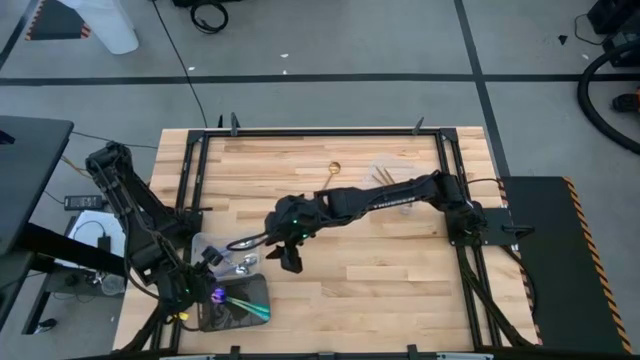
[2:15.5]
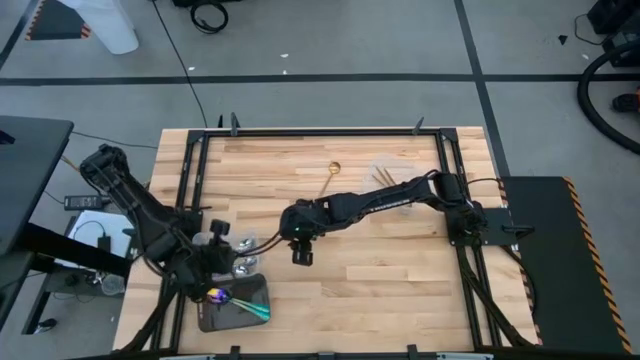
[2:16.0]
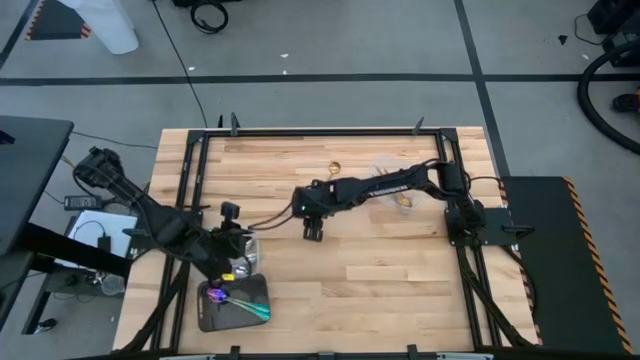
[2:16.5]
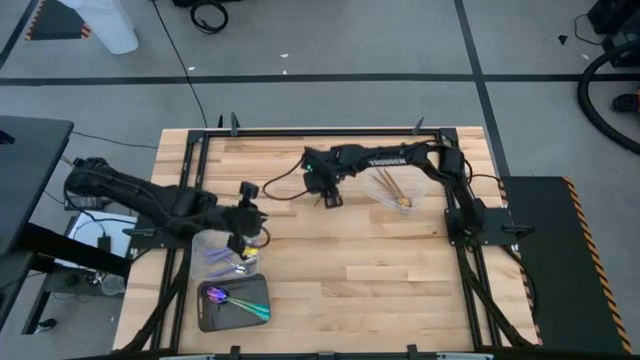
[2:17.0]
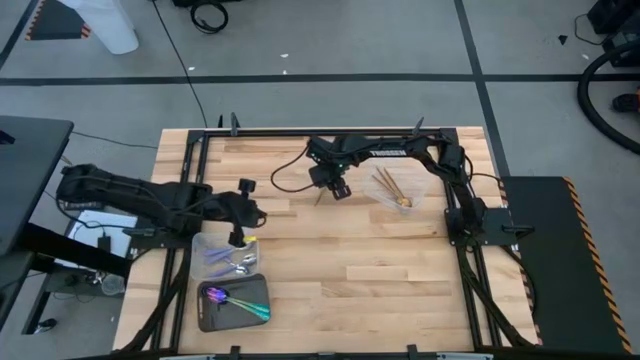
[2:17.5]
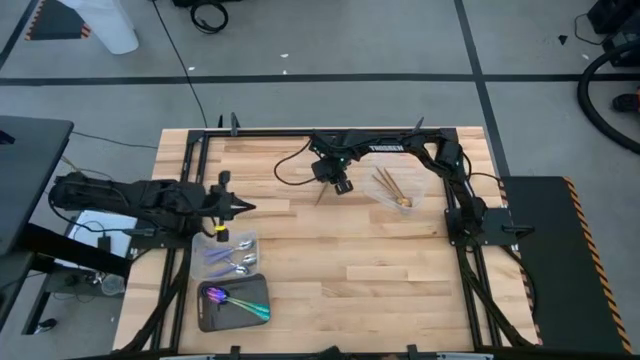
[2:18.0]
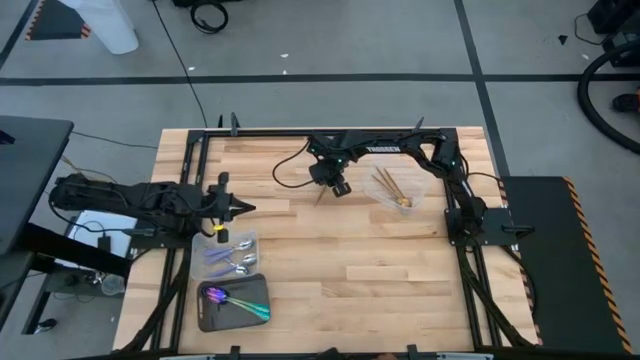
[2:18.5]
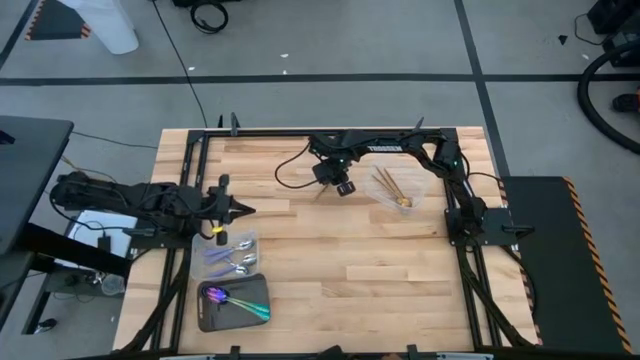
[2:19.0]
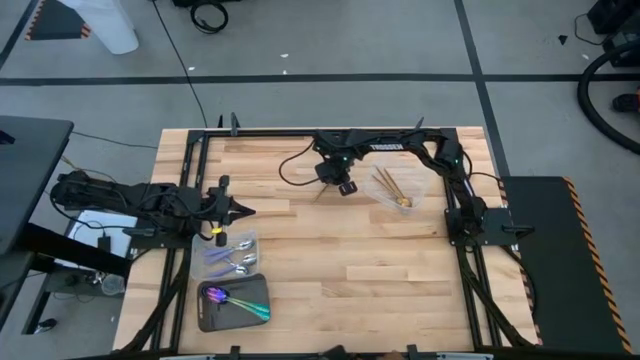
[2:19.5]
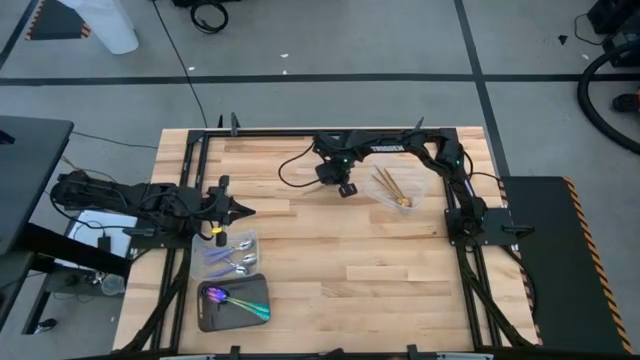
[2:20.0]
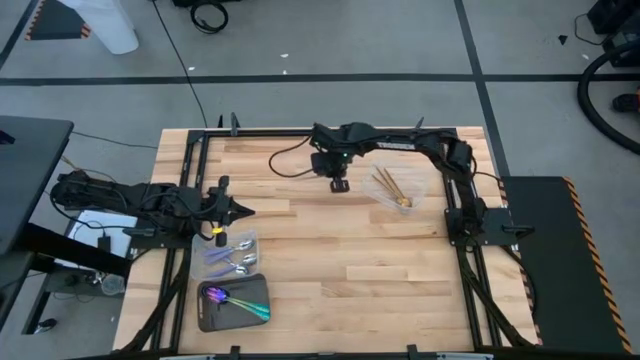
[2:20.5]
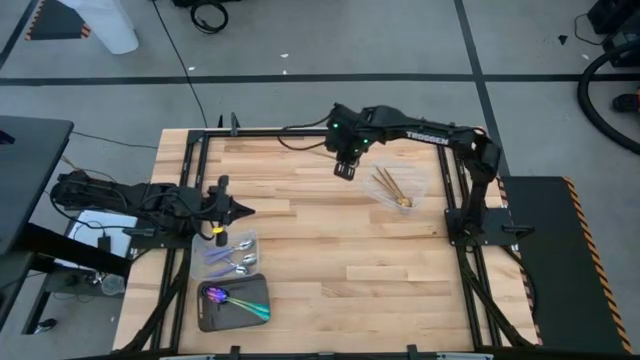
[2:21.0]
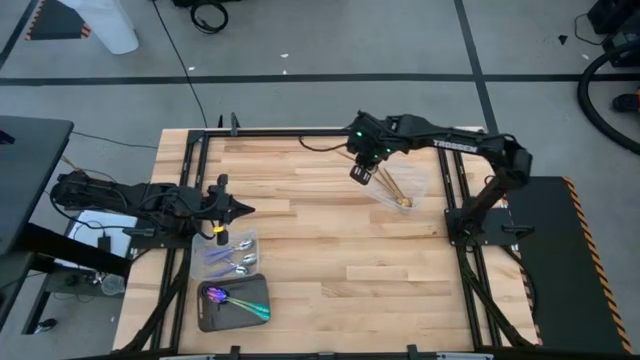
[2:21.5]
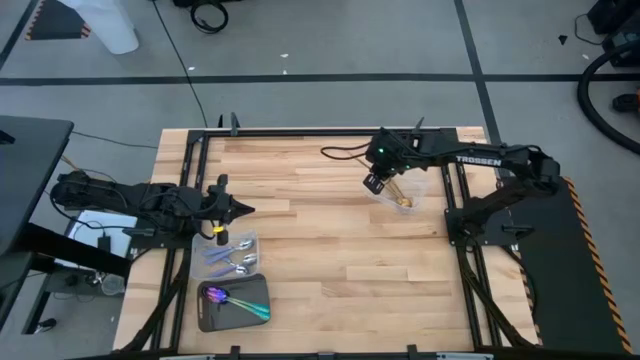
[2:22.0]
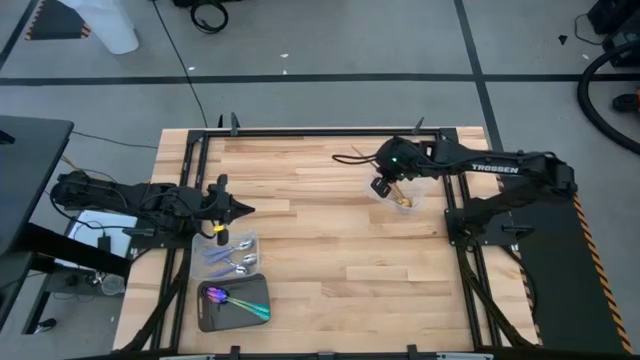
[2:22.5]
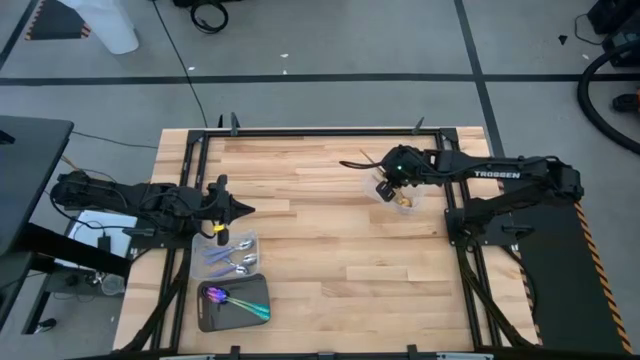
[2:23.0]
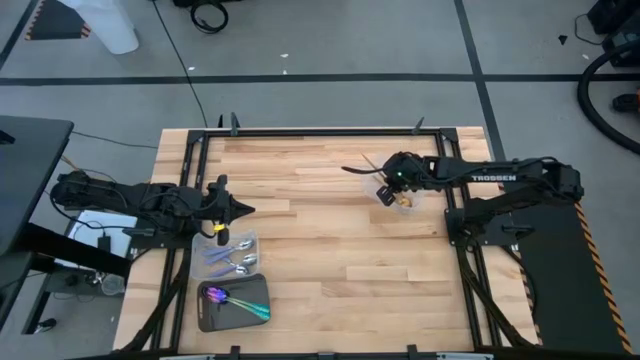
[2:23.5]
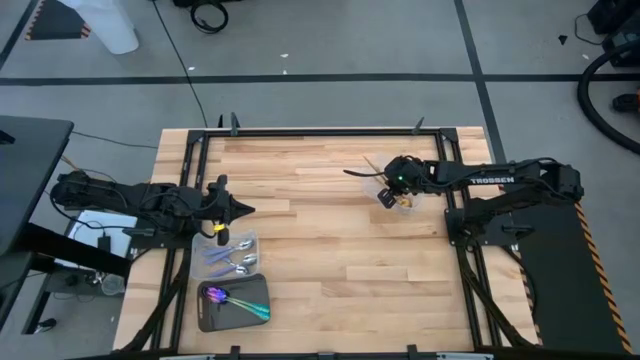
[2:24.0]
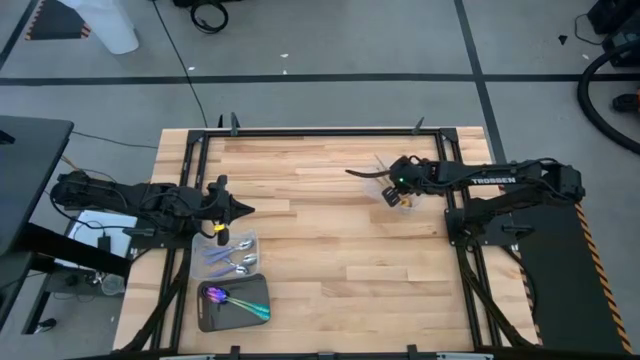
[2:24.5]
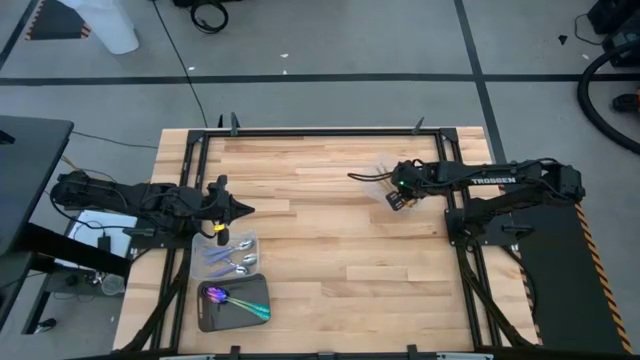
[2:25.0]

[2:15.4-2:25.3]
Task: Sort silverware by color (type)
Put the gold spoon into the top transparent bin

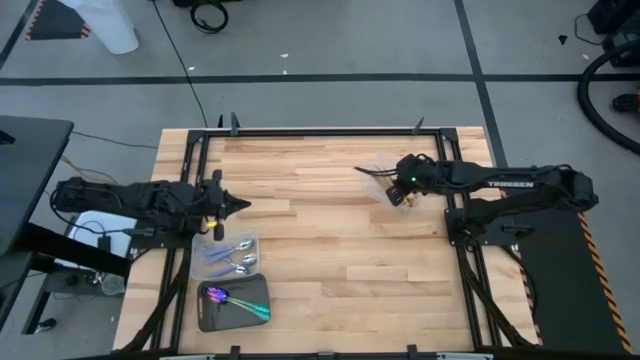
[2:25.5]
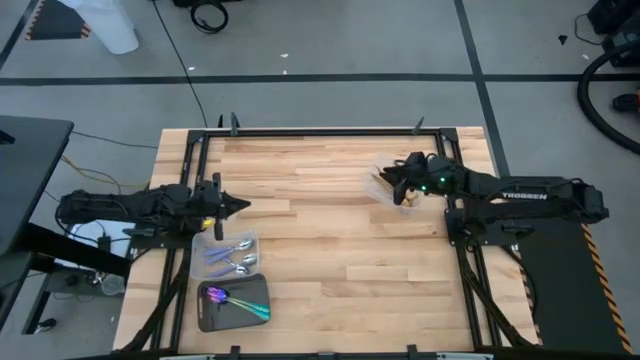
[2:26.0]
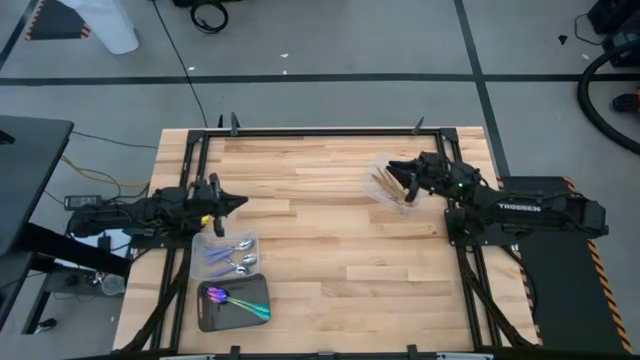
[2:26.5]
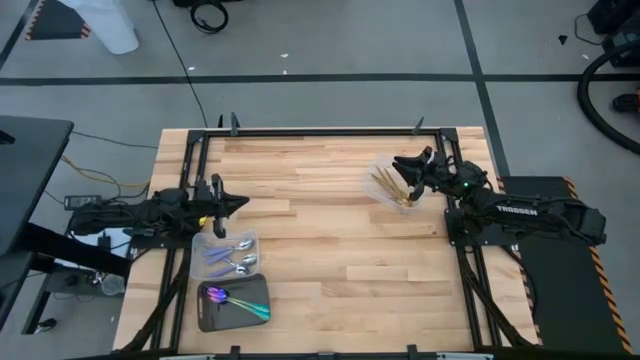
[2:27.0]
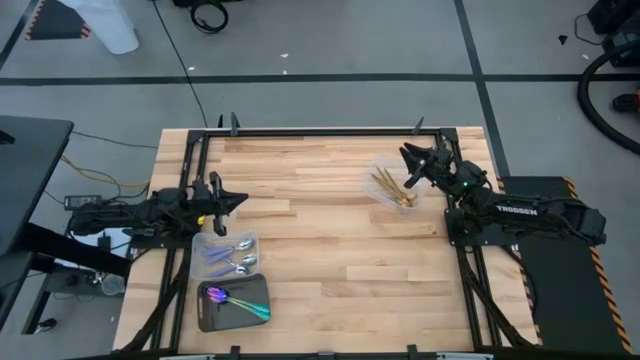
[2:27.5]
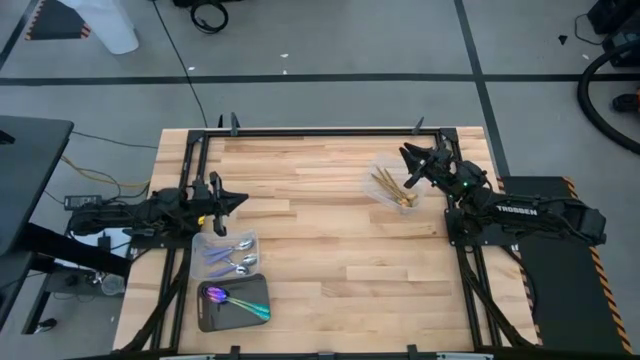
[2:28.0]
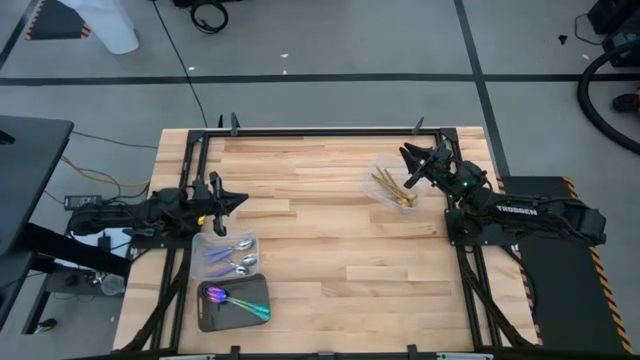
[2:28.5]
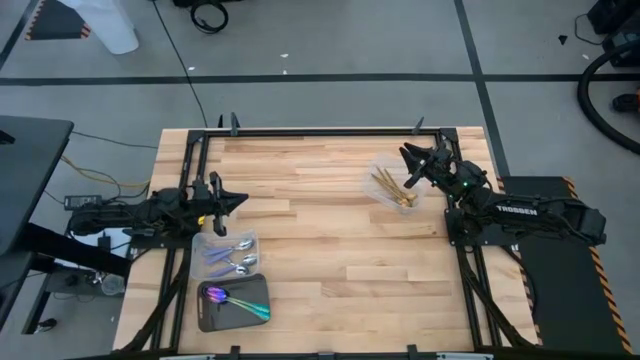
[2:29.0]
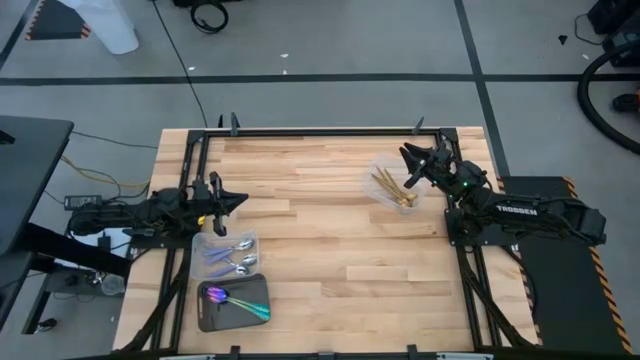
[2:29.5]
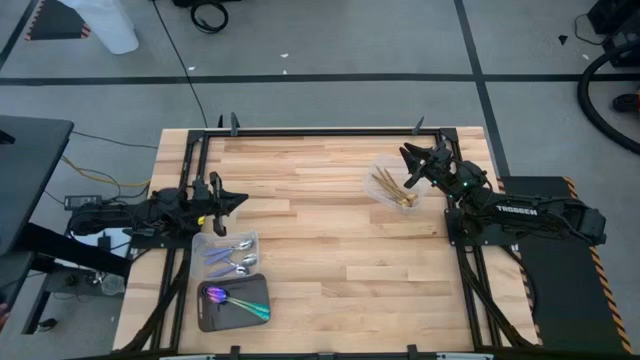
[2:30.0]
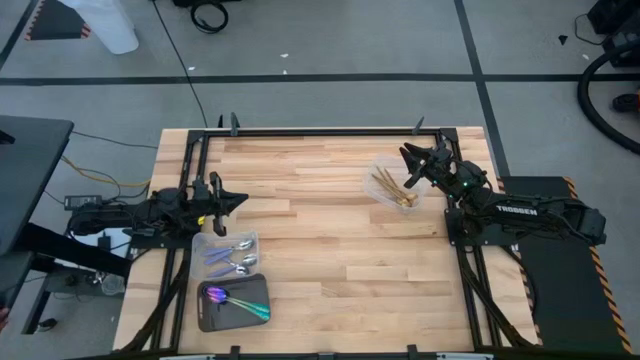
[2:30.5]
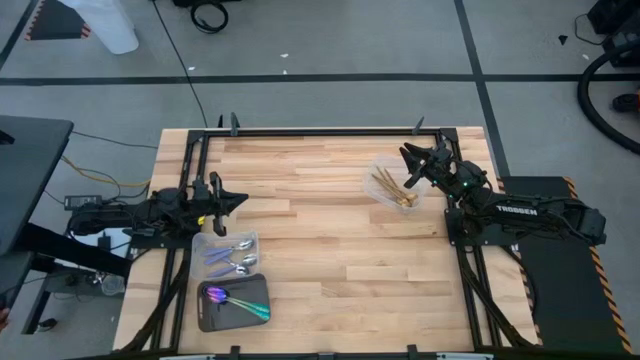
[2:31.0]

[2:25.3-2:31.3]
Return to Home Position

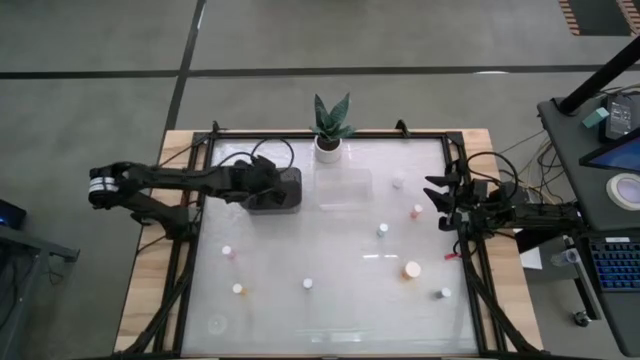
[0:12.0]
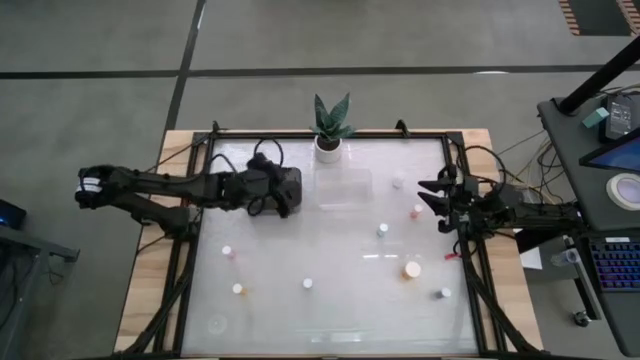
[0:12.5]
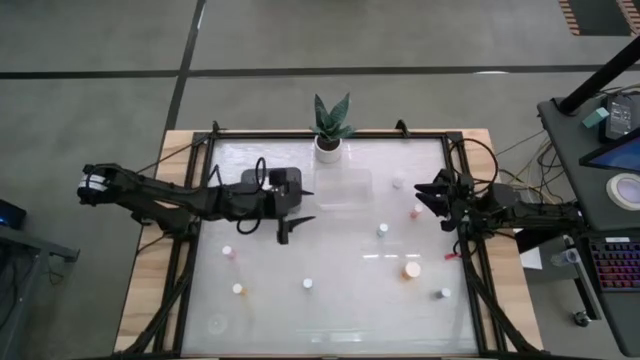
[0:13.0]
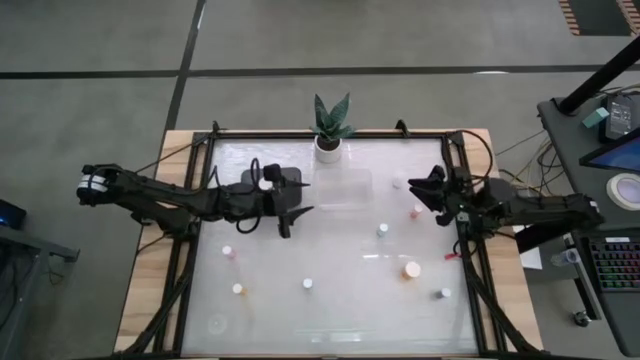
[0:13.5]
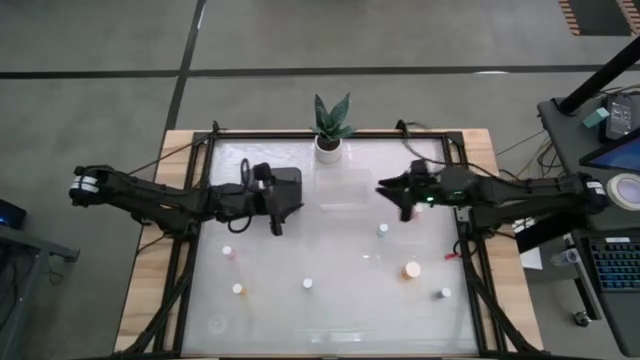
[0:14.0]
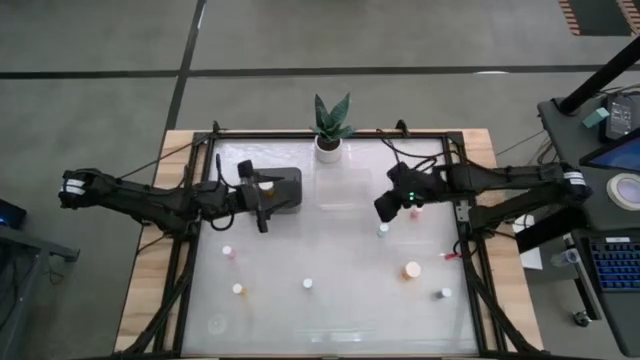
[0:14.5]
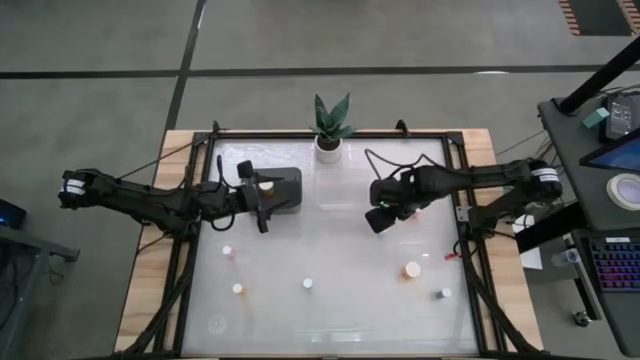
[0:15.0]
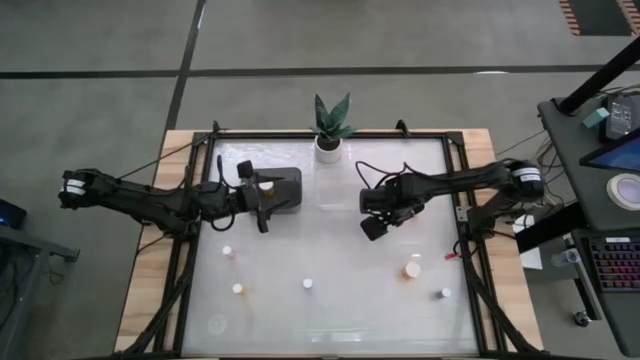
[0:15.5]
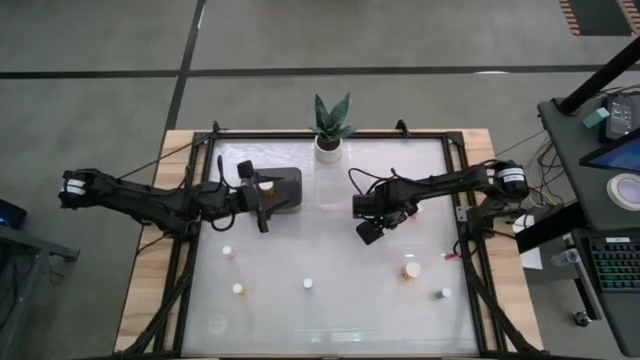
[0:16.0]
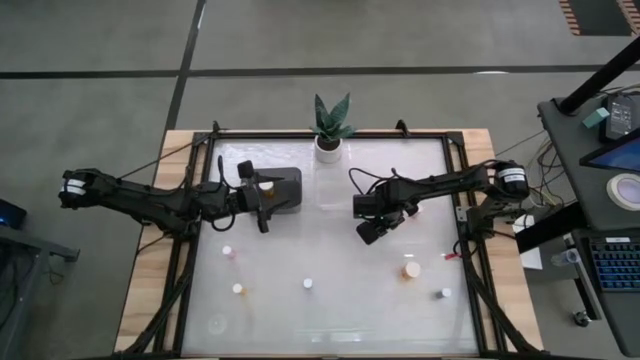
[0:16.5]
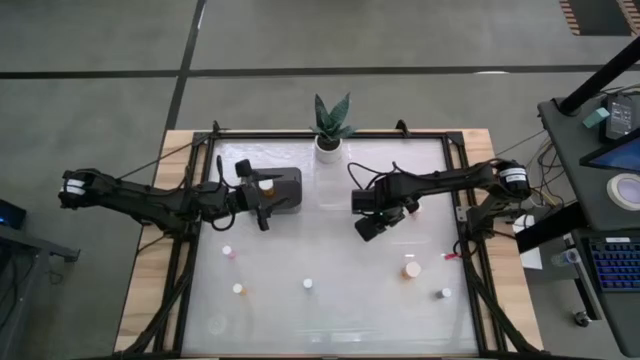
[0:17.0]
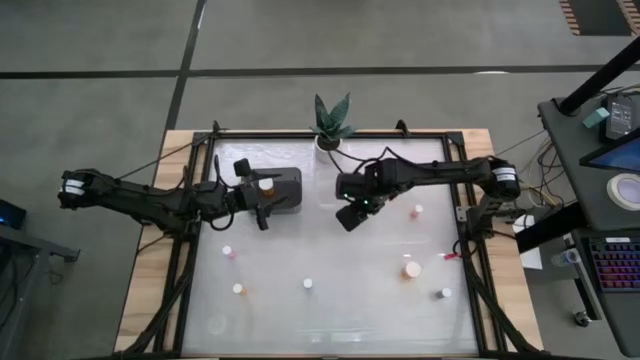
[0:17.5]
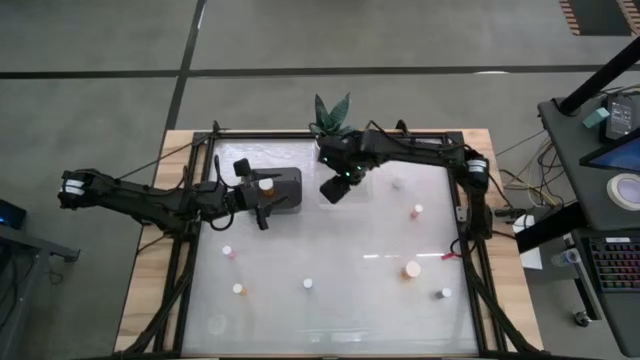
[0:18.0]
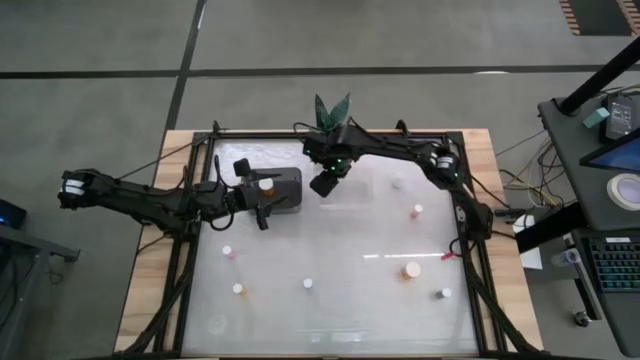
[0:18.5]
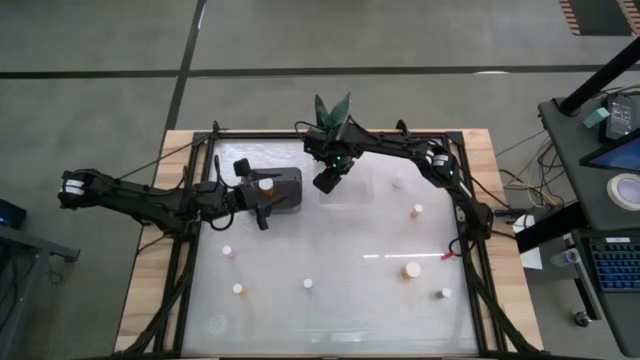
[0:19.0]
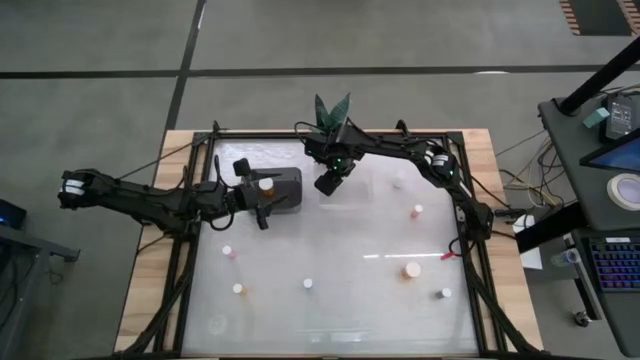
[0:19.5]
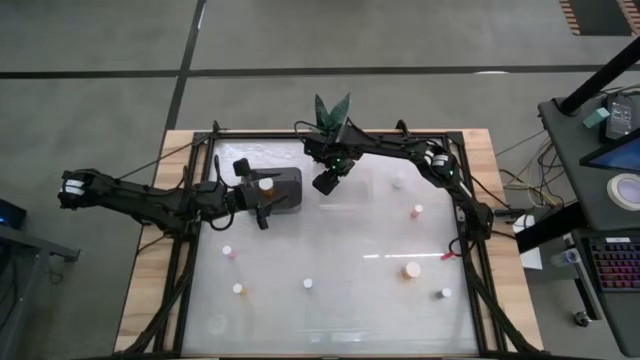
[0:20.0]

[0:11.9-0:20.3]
Task: Pick and place medicine bottles into bin by pill shape (circle, oval)
Put the green tablet bottle into the transparent bin
